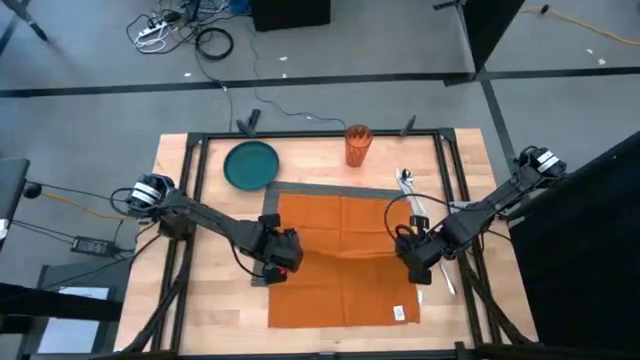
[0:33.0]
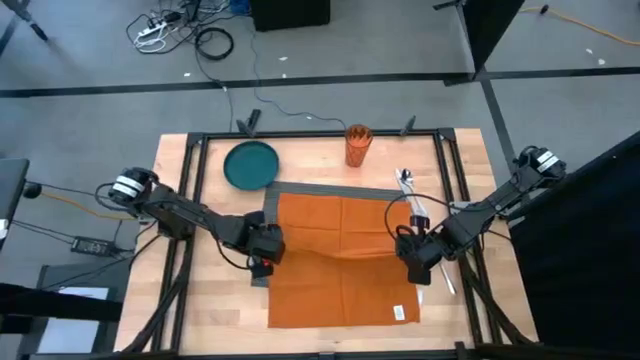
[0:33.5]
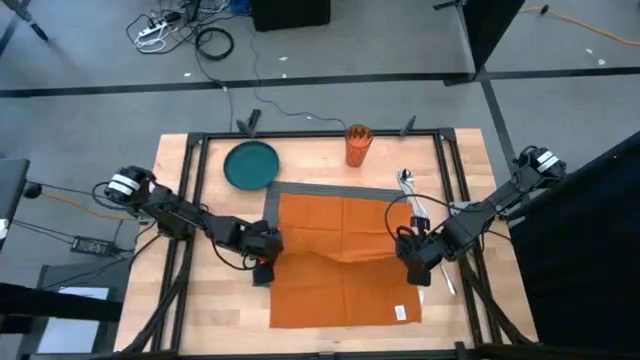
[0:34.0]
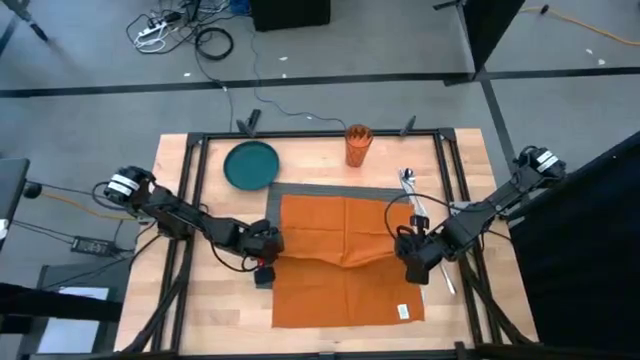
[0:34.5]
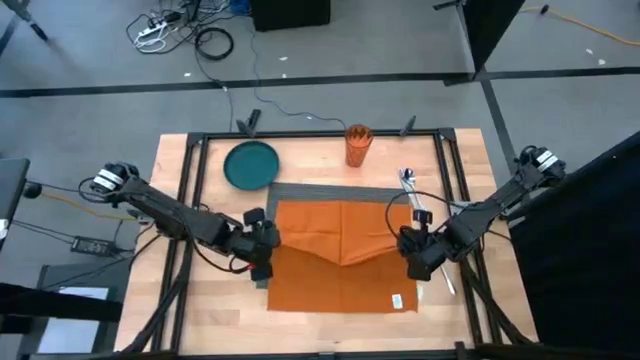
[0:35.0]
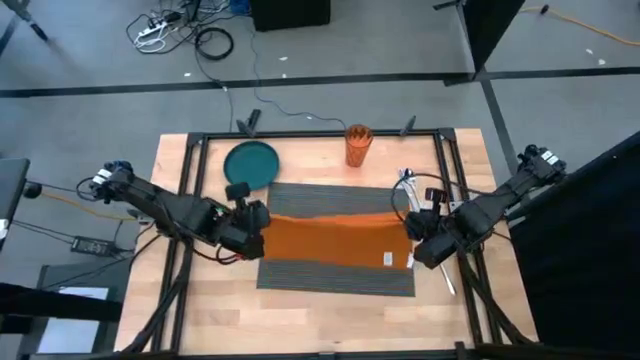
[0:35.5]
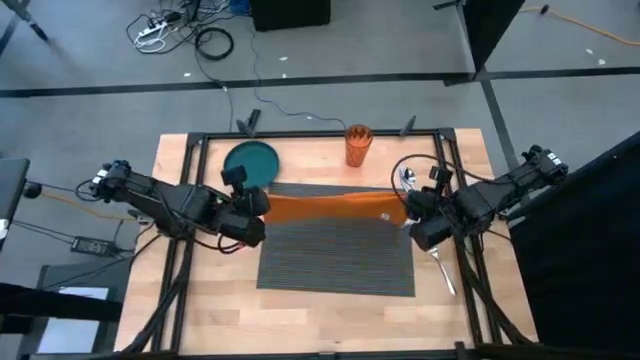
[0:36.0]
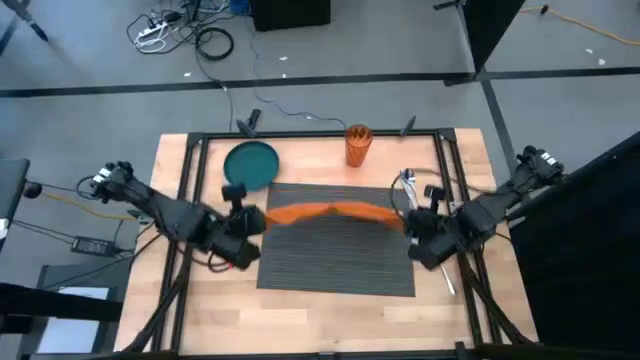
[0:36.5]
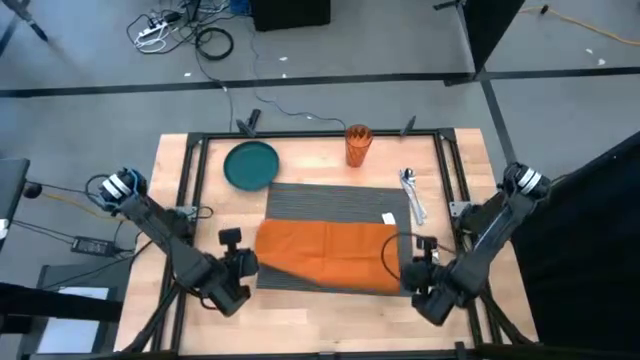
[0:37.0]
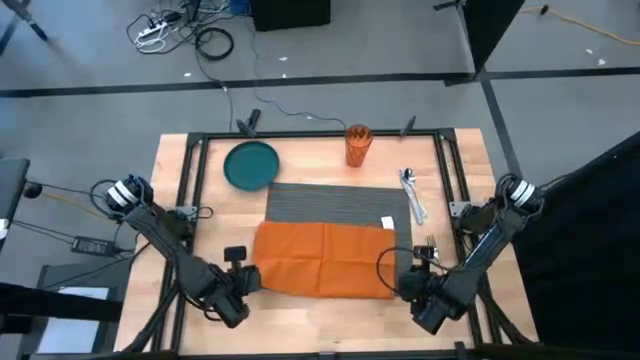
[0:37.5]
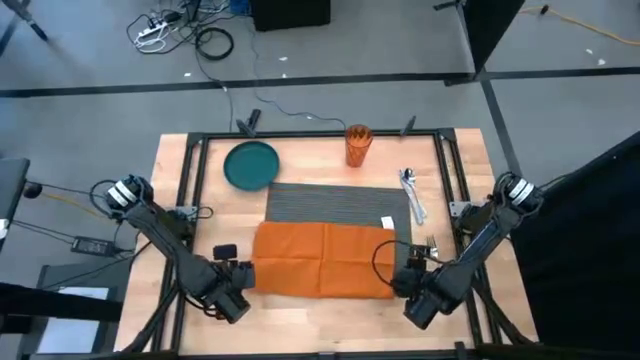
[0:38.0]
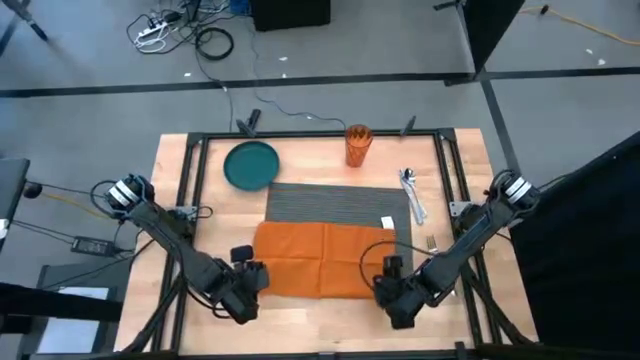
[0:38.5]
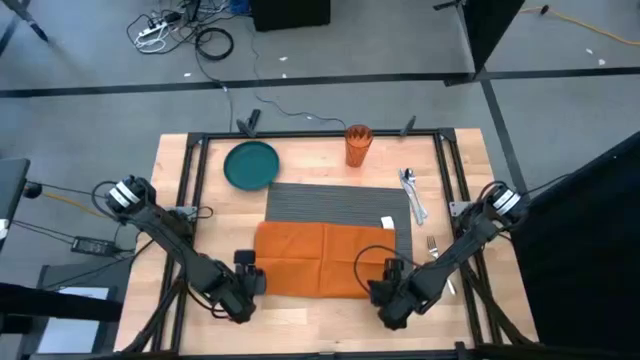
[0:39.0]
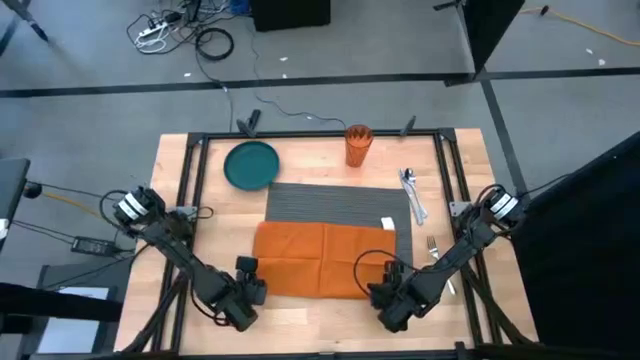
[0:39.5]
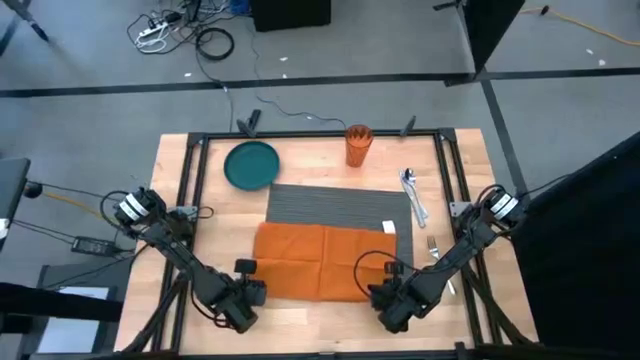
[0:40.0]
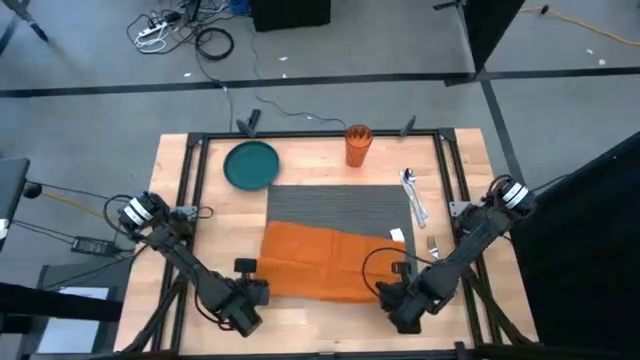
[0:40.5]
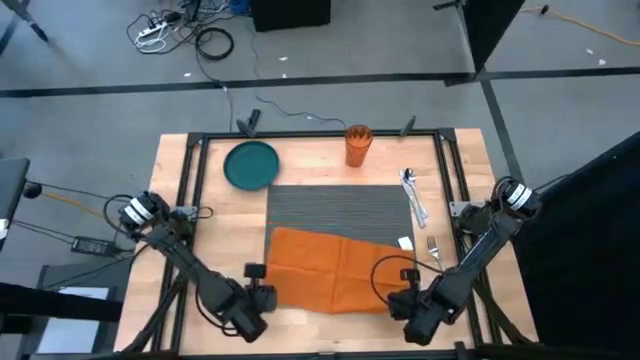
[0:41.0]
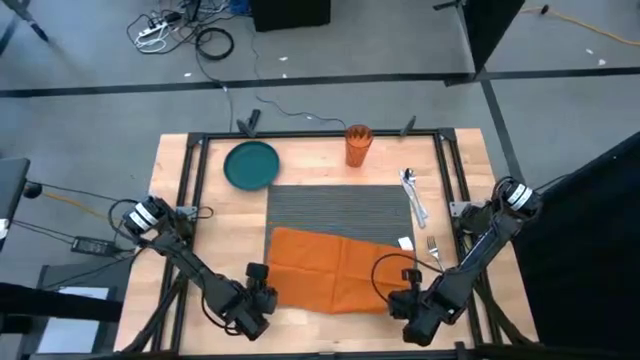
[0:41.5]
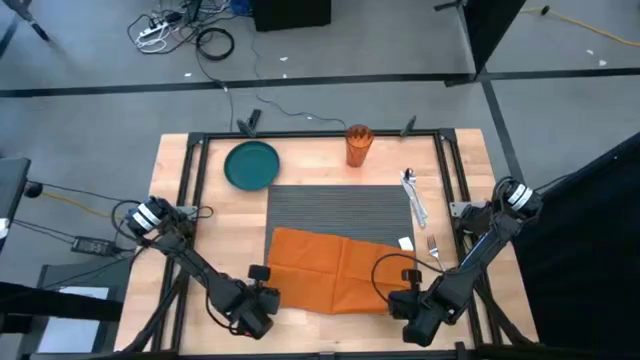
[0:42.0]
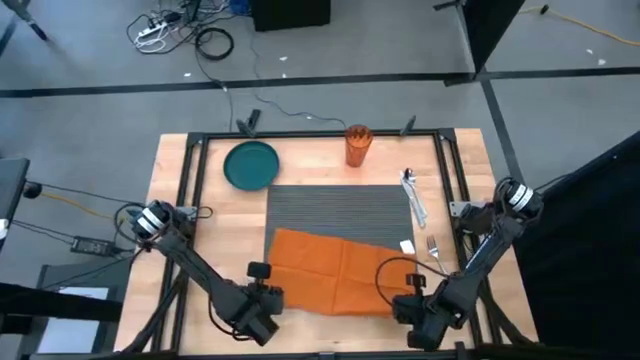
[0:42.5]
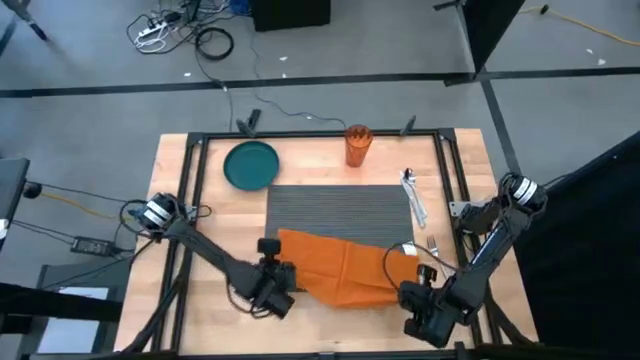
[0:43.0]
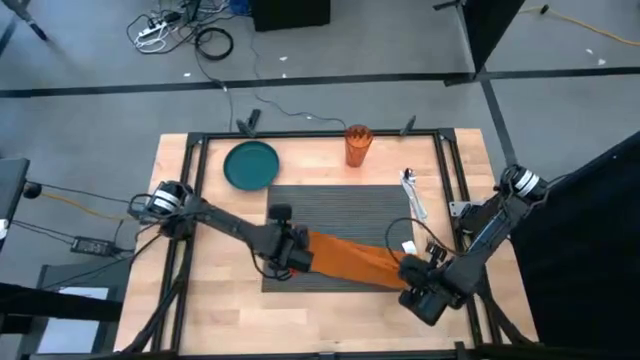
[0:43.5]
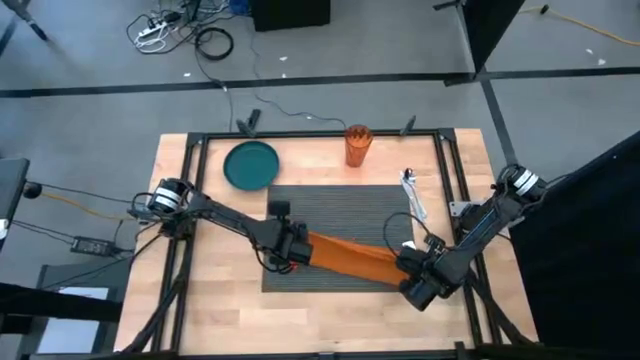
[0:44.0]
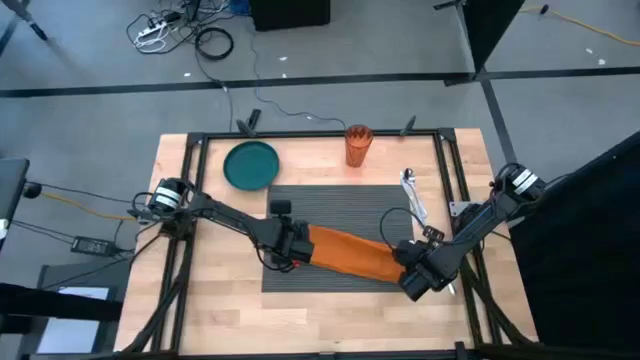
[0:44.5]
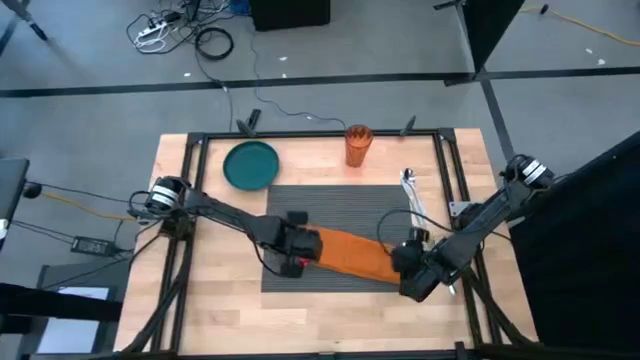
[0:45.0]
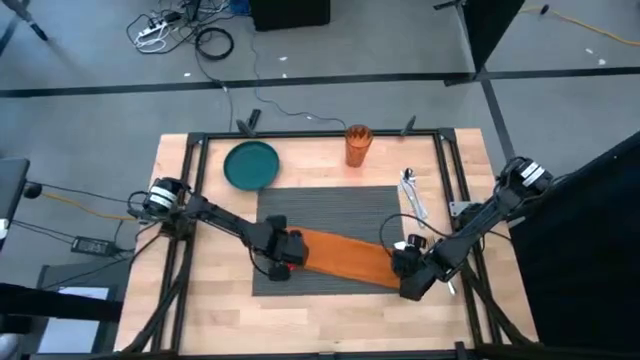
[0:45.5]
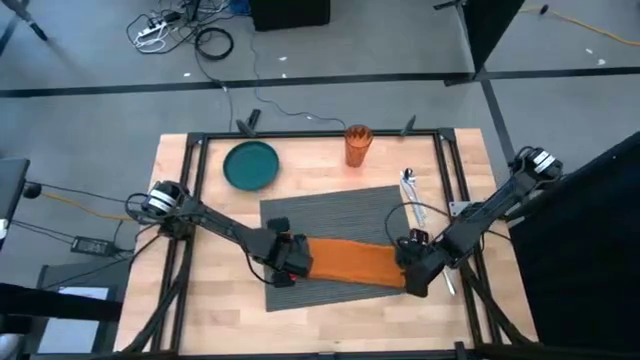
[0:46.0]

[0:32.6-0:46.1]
Task: Set table place
Fold the orange table napkin

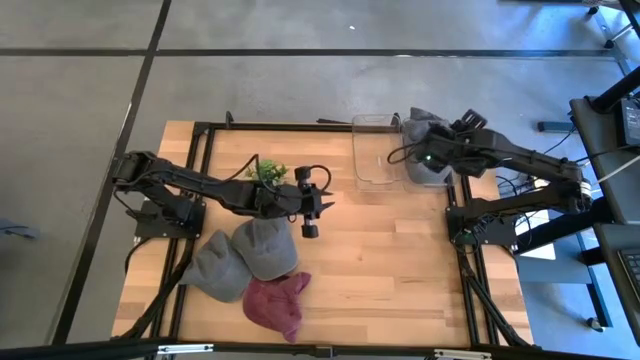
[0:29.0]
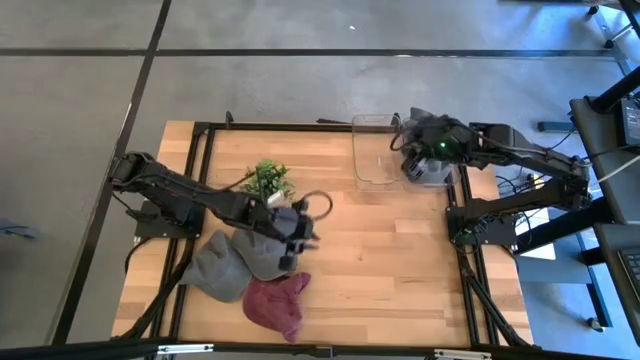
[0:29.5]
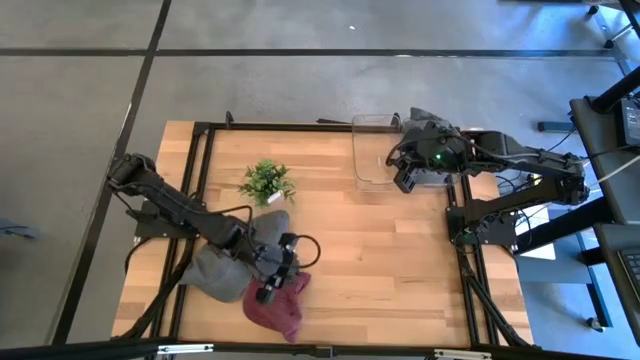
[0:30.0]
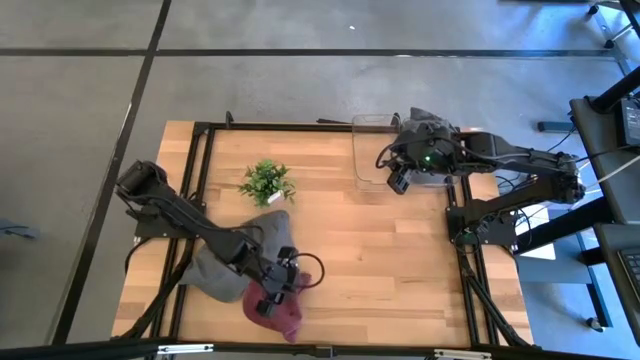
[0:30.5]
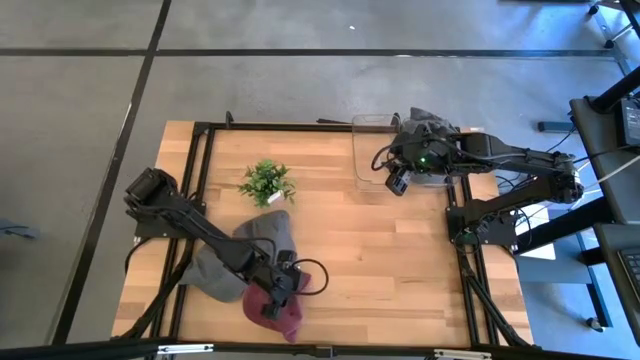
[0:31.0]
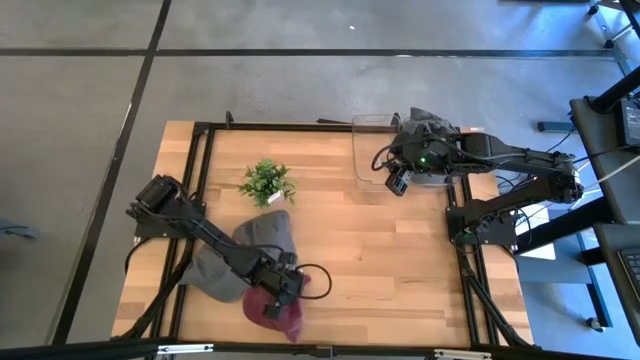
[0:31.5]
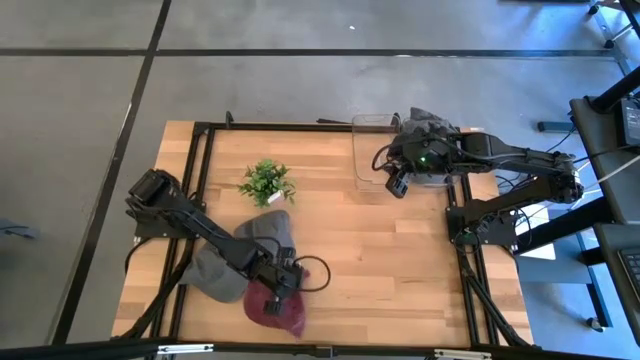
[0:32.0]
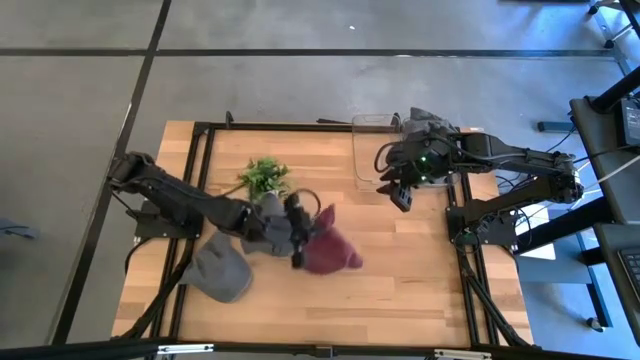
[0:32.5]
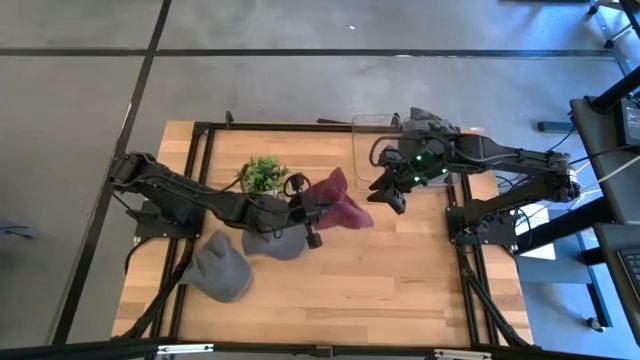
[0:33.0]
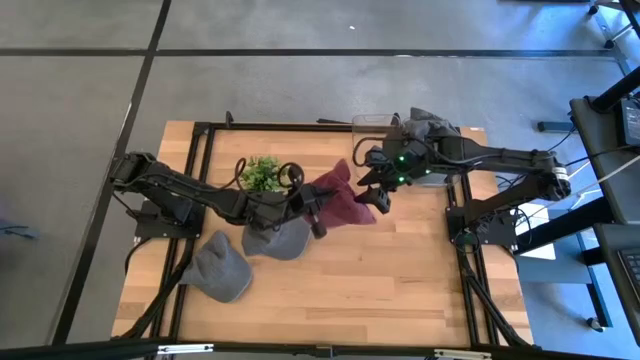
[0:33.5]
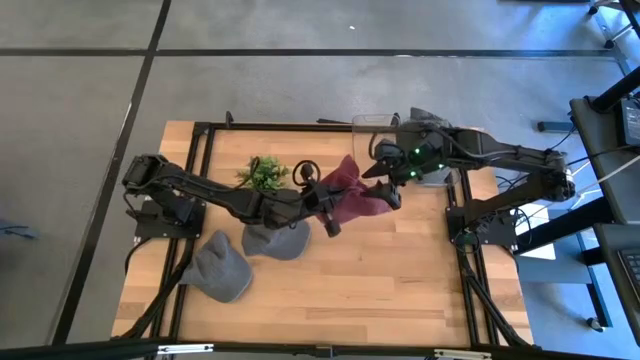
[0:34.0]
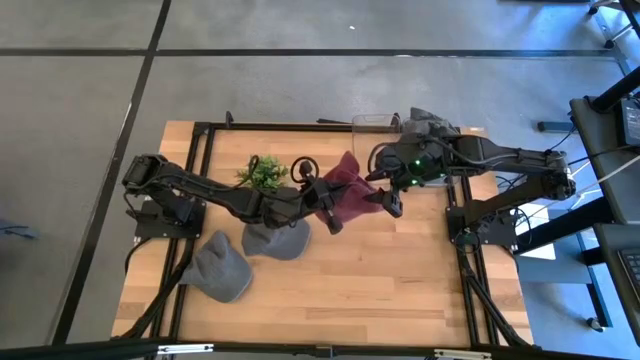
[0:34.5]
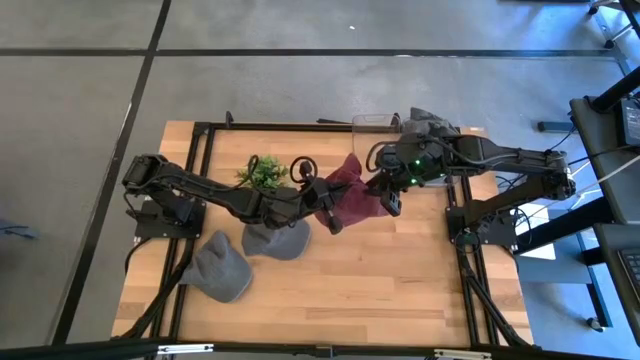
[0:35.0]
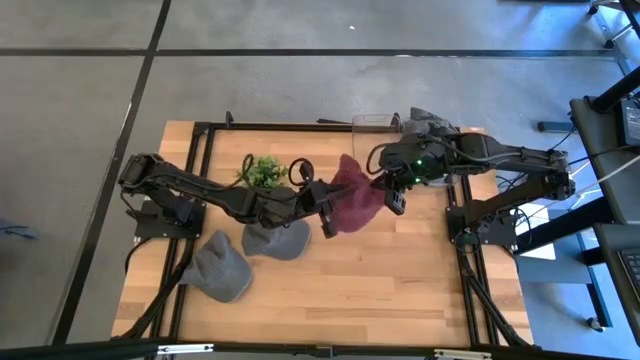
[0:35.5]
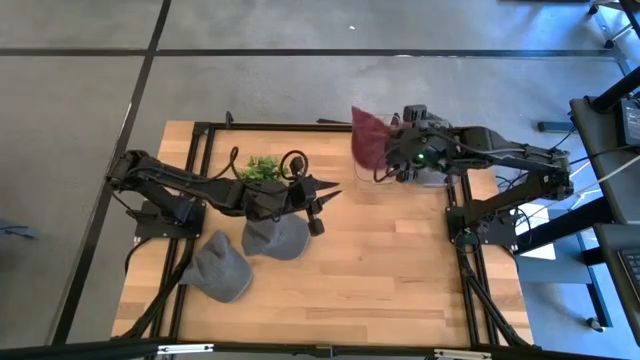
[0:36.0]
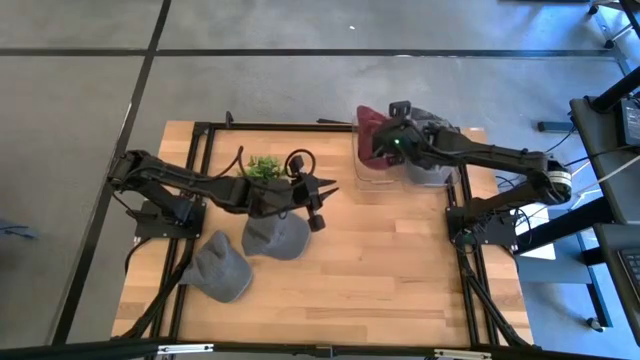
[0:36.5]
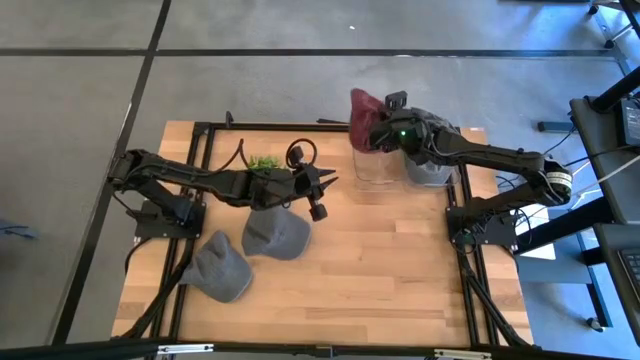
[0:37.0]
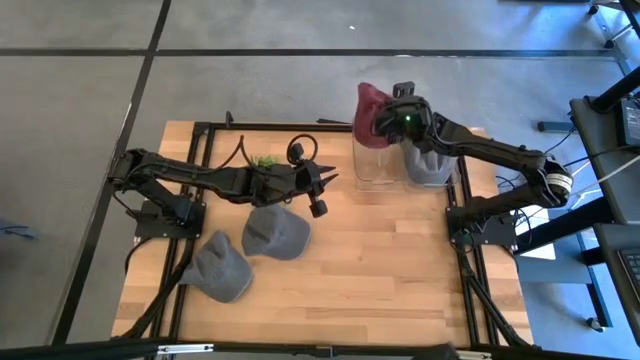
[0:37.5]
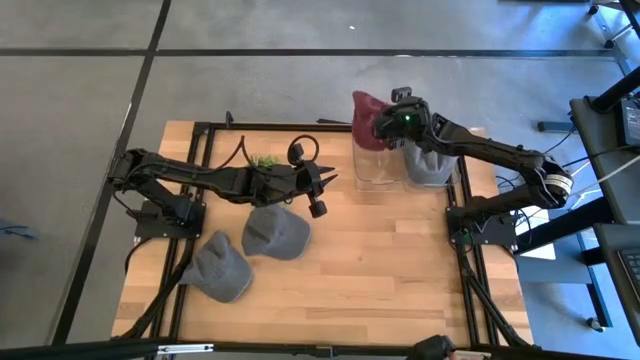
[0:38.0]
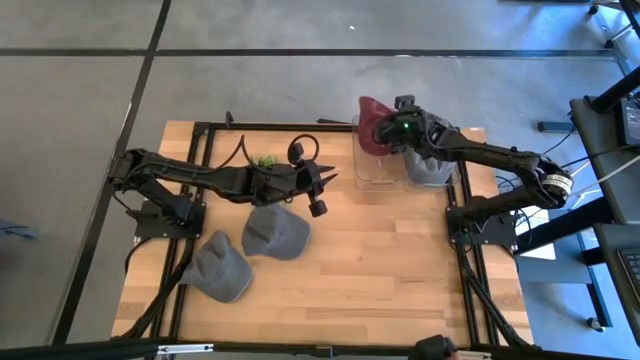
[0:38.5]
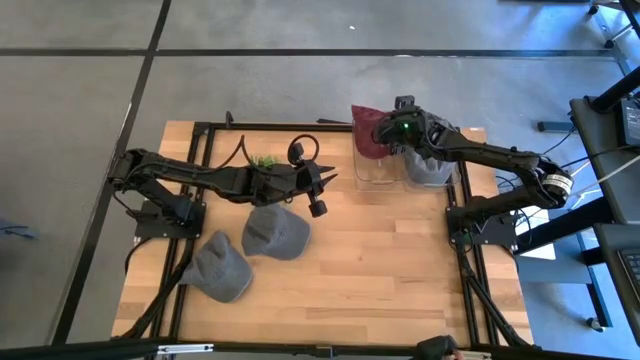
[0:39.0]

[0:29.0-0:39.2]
Task: Pick & Place hat
Put the red cap into the left transparent bin
